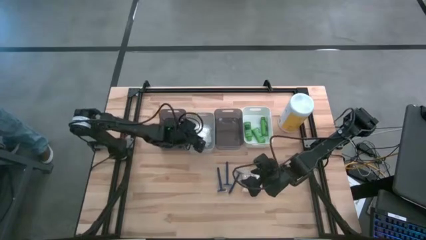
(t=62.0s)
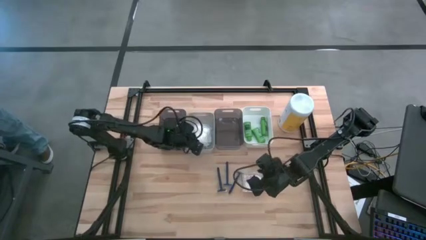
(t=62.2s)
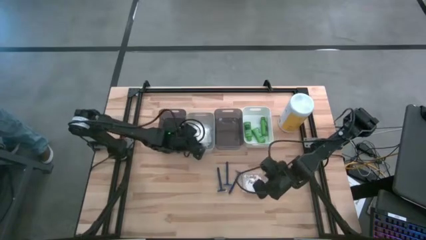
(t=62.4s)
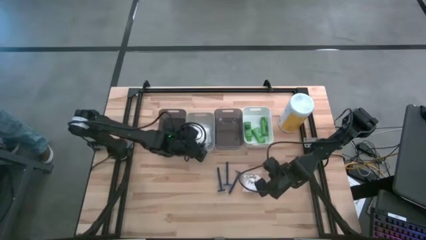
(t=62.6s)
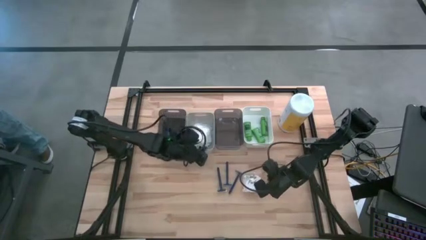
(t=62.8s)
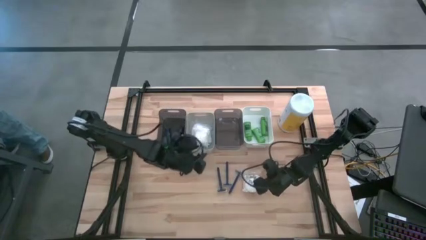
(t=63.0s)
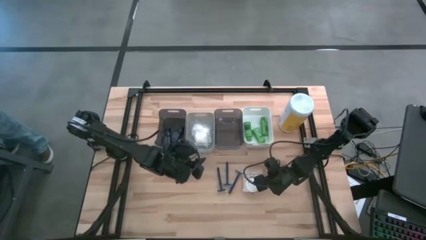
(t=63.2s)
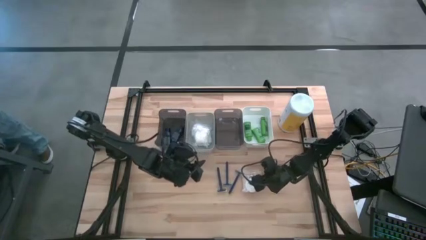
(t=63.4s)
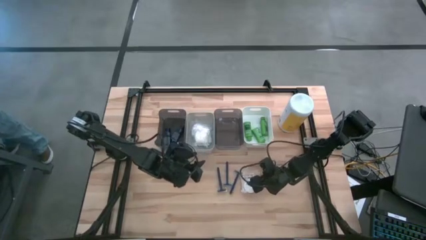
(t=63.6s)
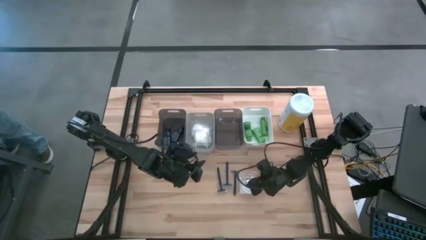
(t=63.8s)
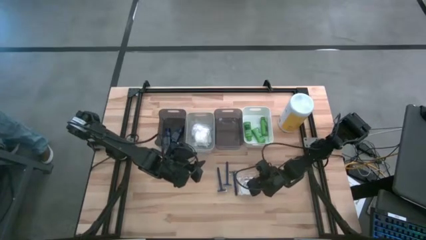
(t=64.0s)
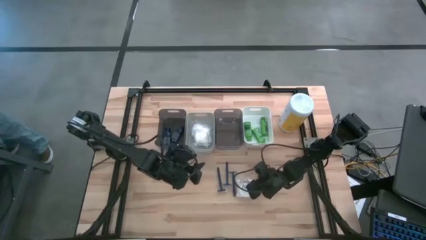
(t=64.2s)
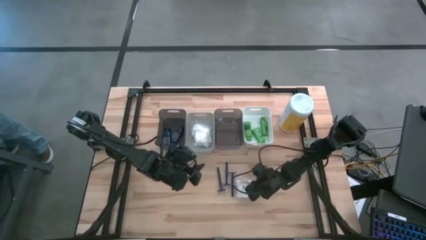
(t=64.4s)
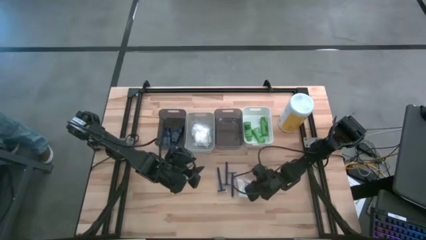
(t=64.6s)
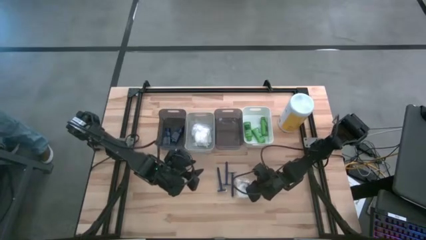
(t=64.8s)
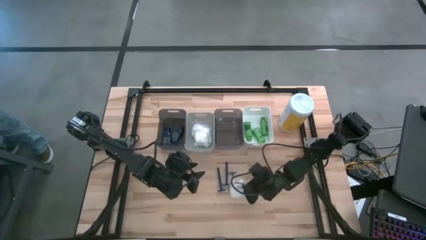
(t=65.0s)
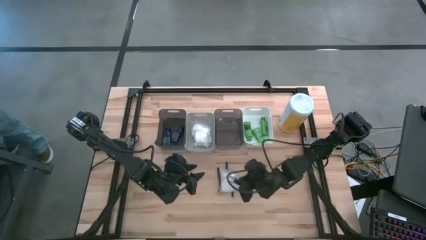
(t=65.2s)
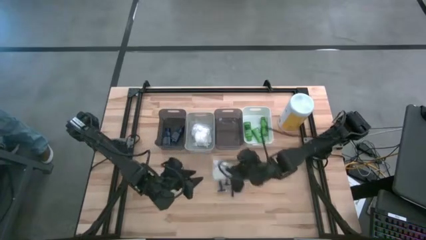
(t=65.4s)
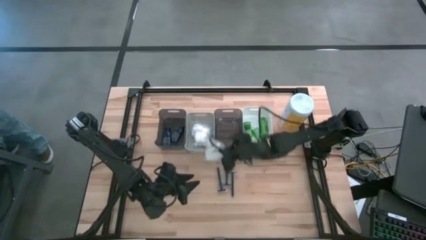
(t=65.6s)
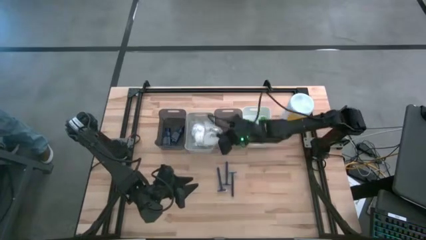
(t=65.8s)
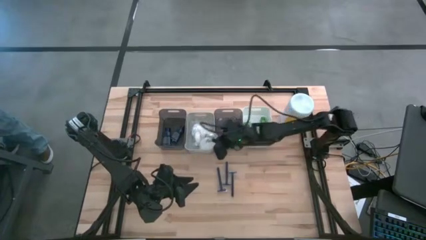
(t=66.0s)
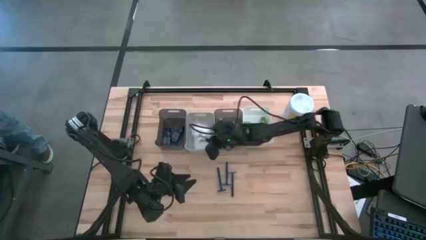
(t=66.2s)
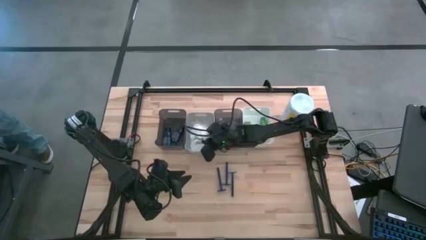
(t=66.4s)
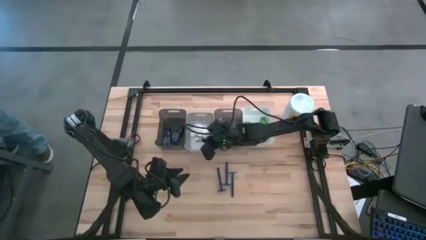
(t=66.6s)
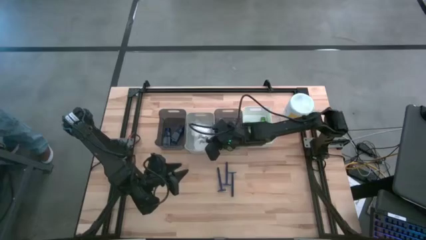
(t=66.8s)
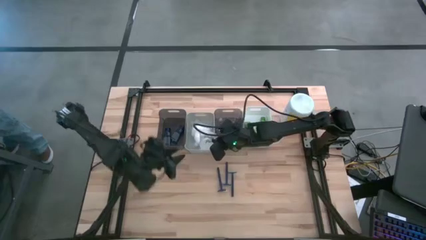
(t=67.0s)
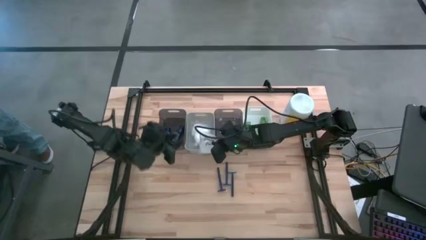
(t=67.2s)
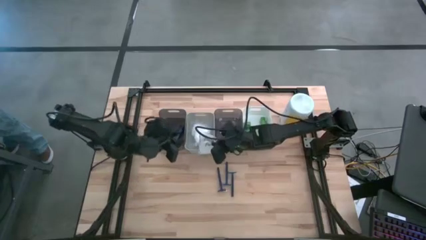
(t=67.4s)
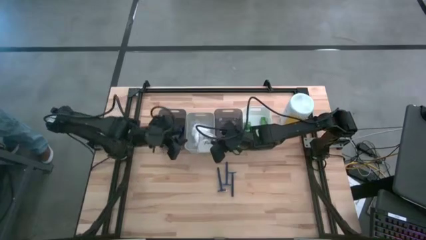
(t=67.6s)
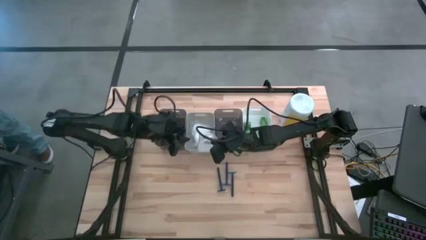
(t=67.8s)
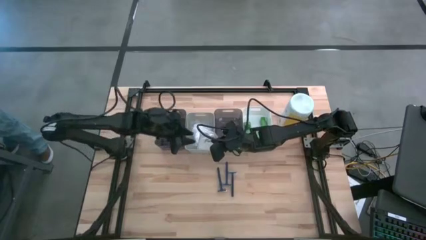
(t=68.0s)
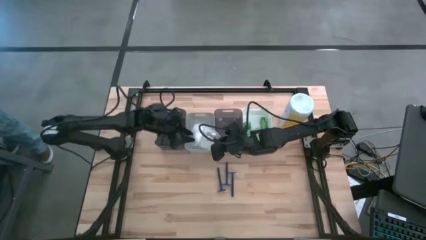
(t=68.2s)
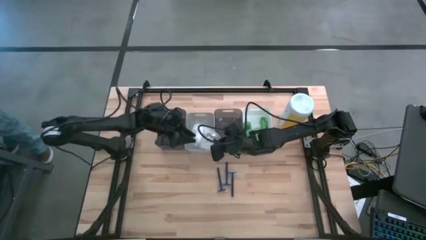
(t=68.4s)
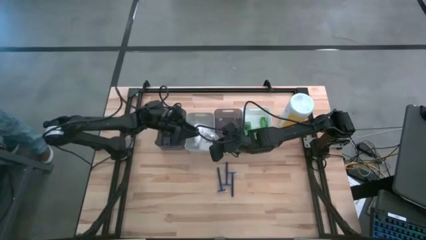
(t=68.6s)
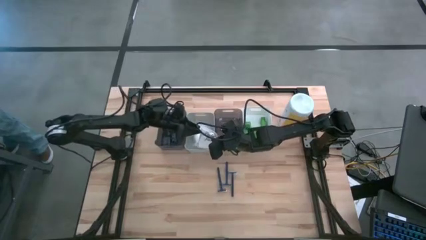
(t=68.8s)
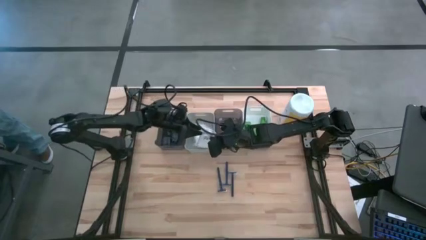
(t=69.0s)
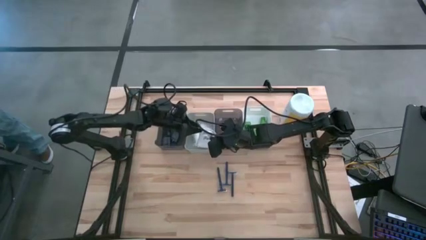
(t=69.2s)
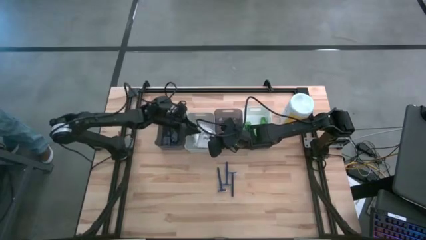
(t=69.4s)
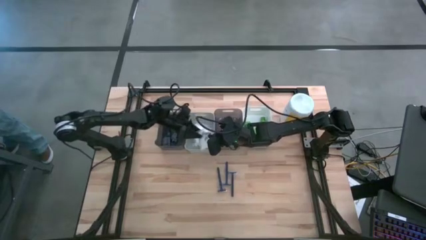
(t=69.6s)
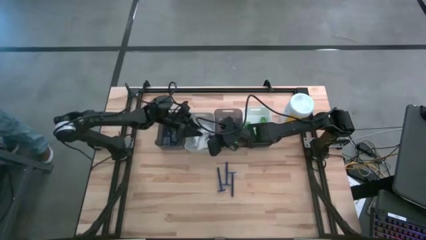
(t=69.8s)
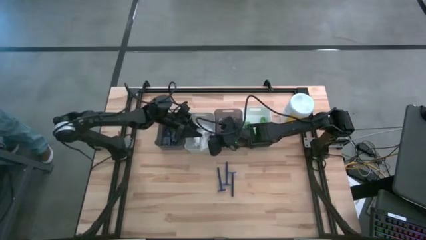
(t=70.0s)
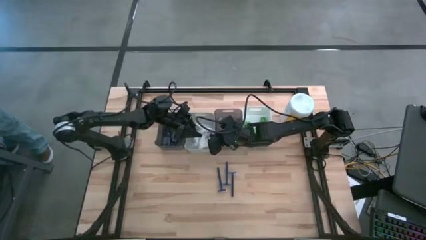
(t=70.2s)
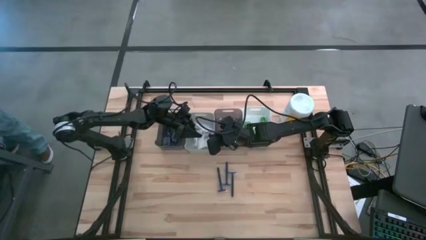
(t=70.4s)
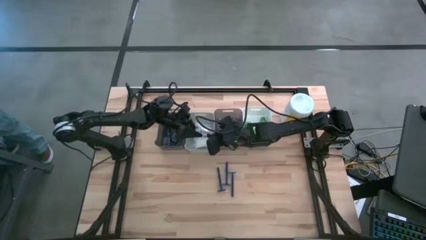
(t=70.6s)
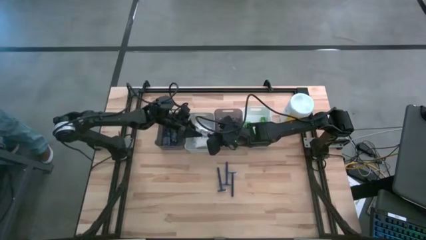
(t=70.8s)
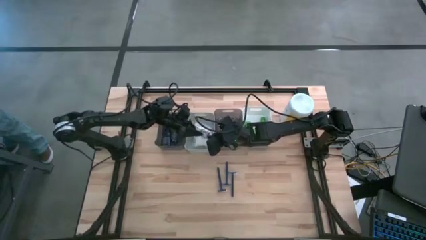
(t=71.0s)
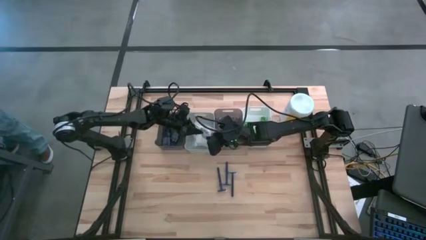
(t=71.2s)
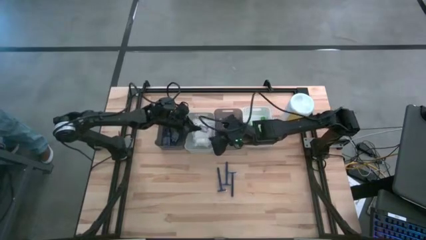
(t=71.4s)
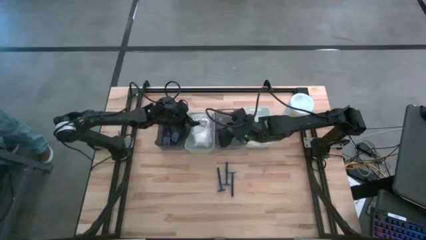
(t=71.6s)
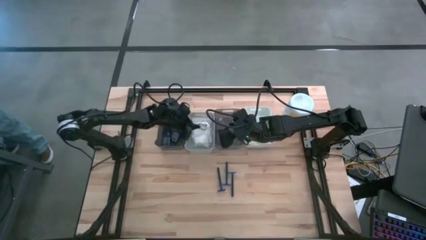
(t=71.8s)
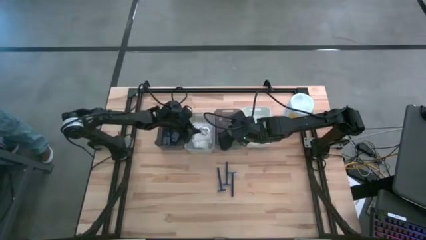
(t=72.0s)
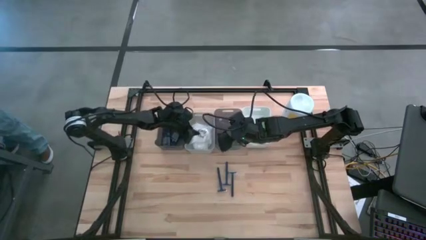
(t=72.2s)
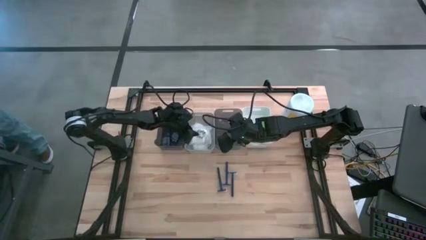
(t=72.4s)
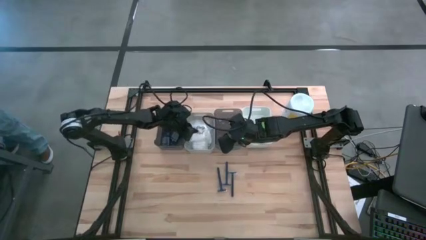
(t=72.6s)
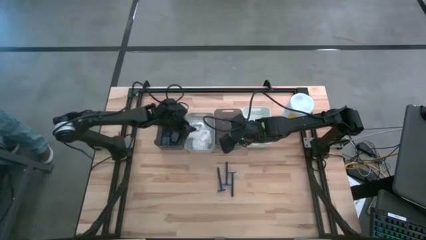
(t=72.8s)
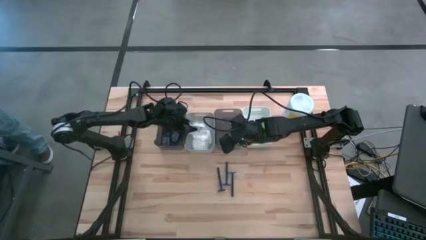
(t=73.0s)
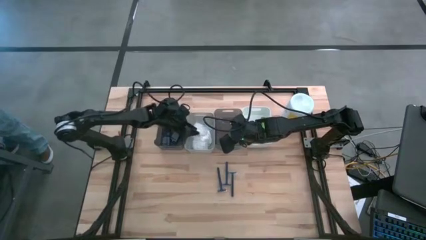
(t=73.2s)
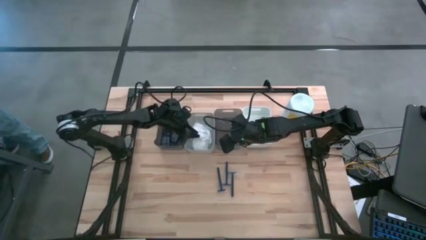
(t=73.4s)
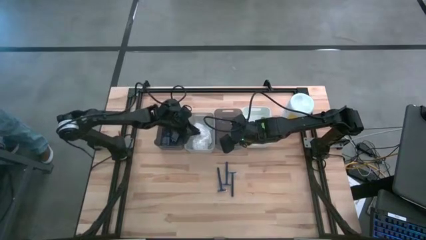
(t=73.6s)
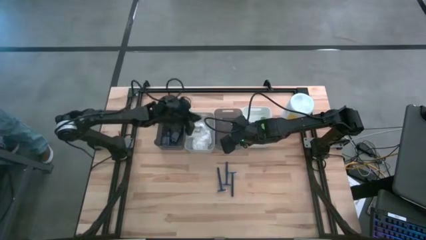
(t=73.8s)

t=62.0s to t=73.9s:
Task: Pick & Place Travel size toiletries
Put the white cotton pack into the gray bin

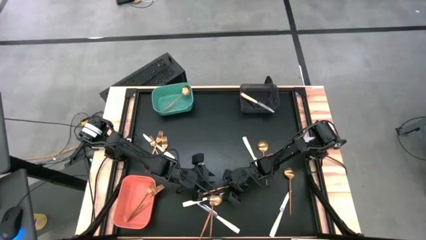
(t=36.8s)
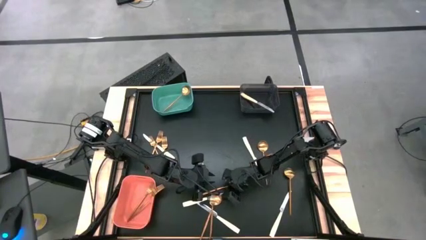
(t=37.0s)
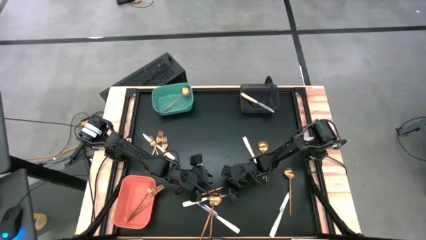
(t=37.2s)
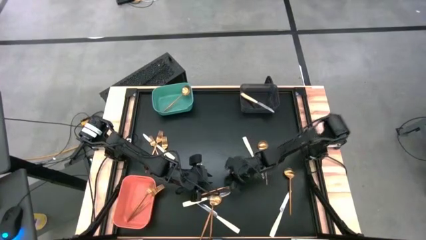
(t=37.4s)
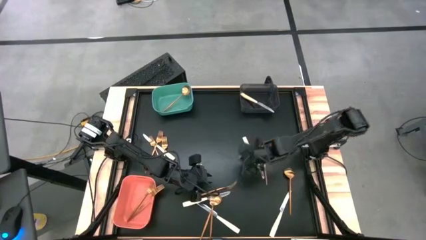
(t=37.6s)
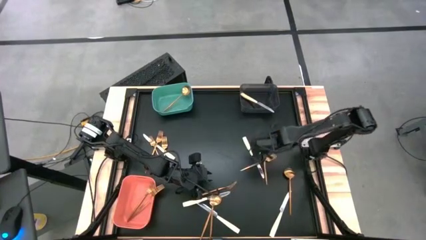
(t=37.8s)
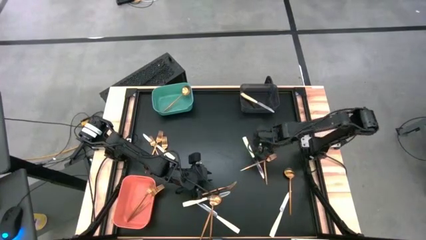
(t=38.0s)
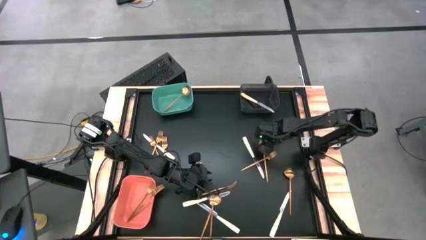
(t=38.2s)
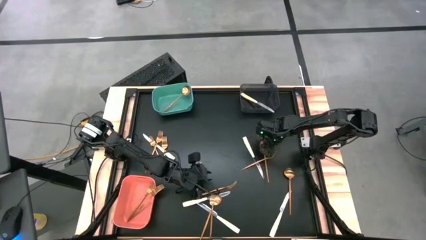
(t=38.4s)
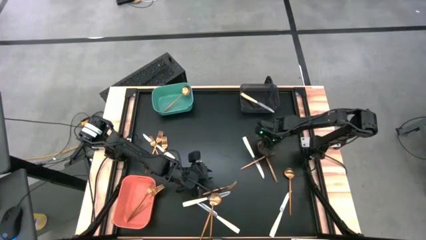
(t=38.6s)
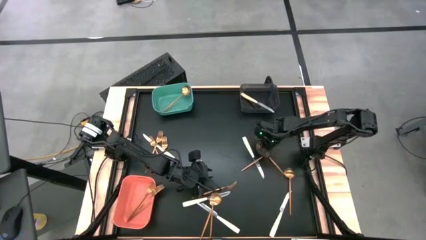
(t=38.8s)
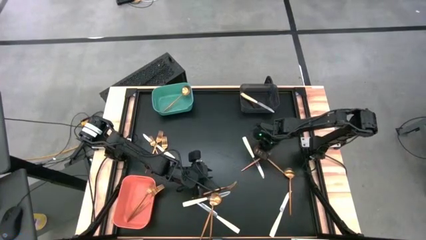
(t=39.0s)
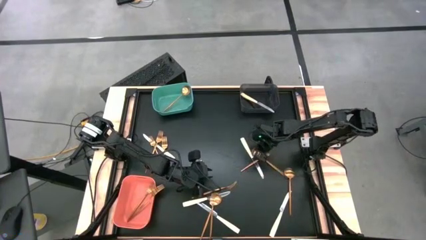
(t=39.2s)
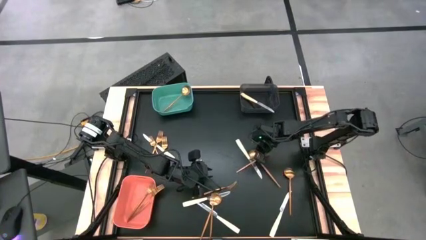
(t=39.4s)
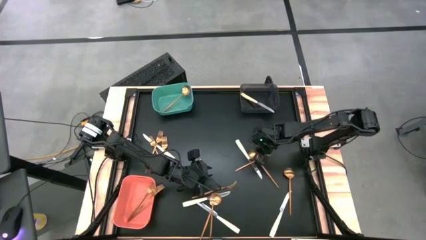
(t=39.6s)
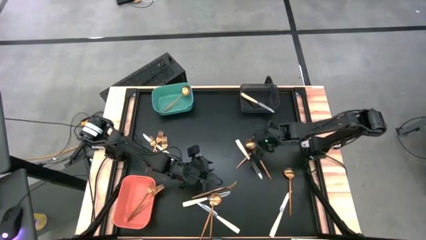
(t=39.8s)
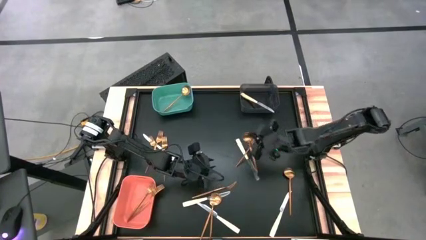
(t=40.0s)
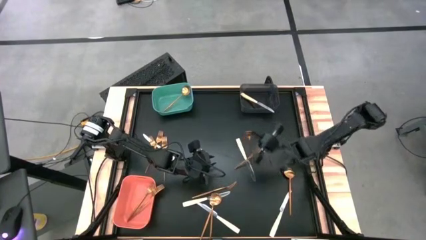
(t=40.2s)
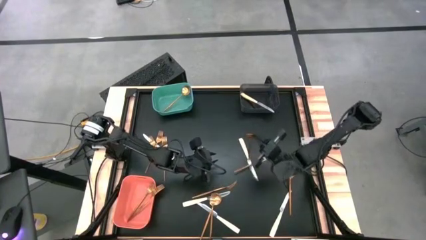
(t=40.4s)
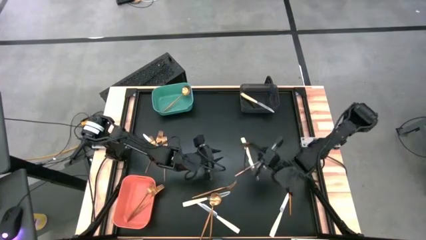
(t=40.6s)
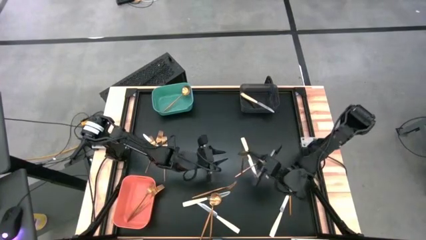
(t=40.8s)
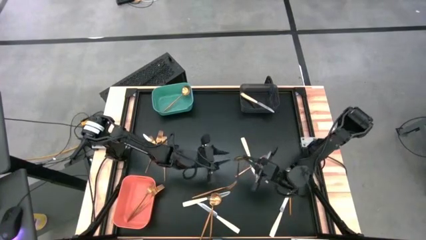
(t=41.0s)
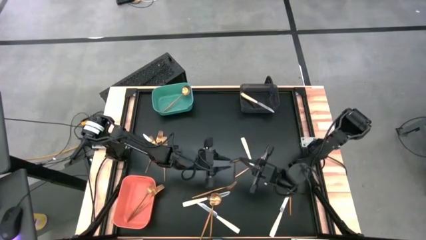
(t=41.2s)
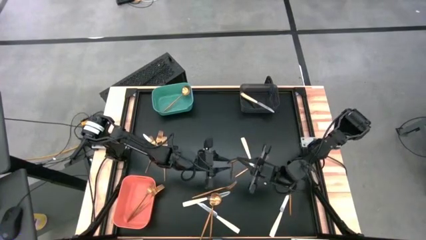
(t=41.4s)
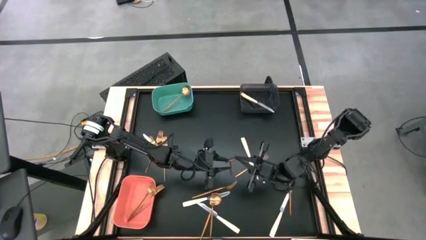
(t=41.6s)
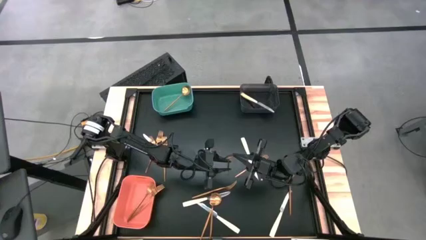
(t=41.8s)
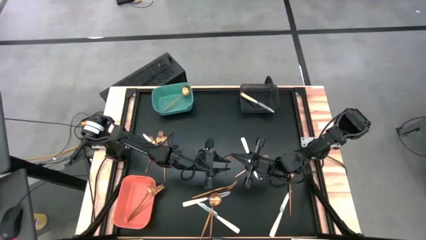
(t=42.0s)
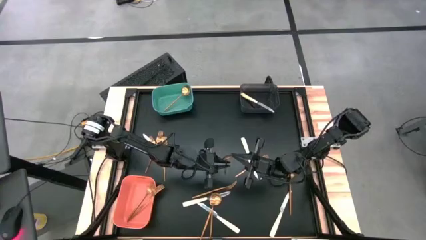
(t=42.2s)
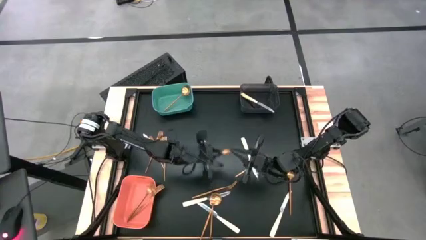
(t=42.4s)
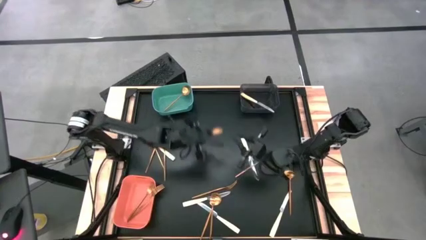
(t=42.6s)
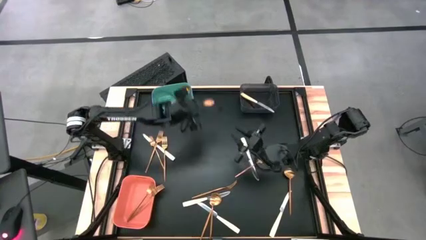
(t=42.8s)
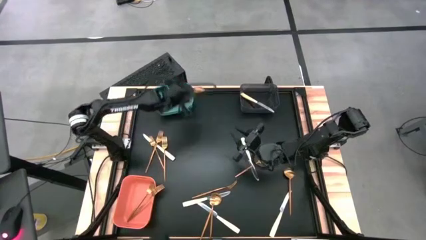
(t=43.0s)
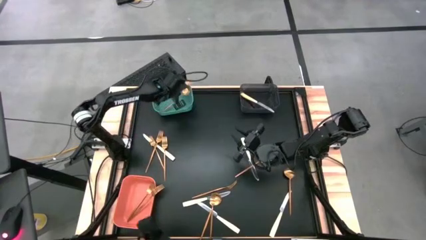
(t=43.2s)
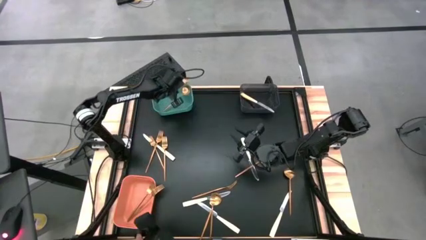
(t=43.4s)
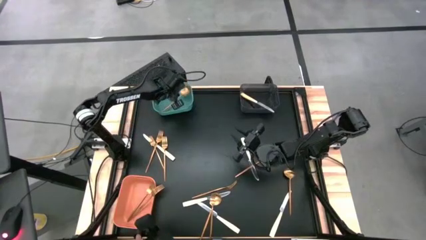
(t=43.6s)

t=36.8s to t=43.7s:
Task: Sort silverware by color (type)
Put the gold spoon into the green bin
